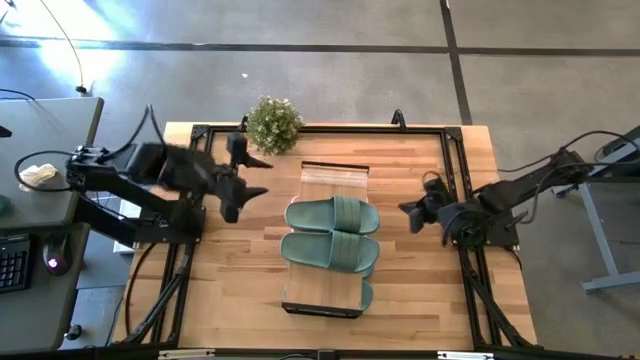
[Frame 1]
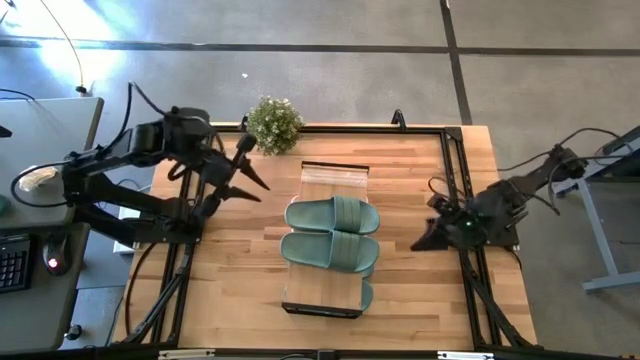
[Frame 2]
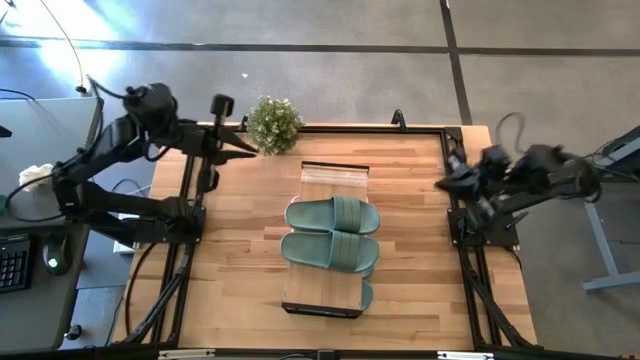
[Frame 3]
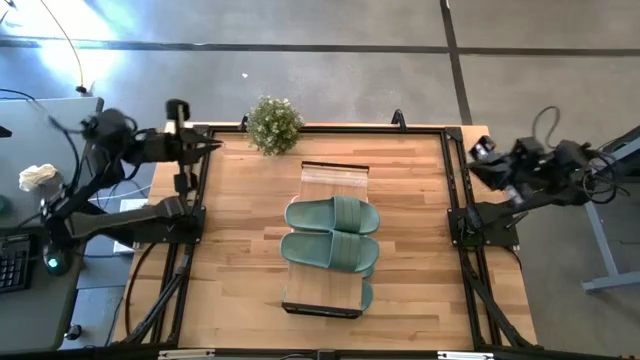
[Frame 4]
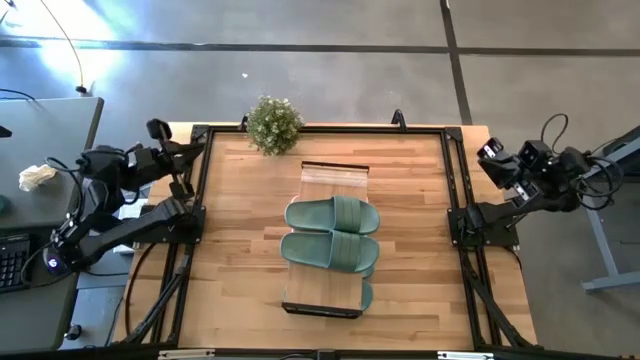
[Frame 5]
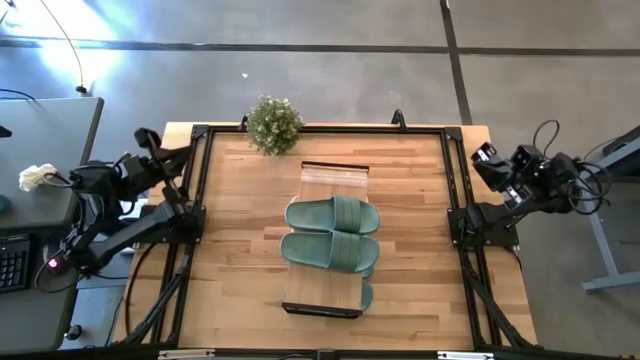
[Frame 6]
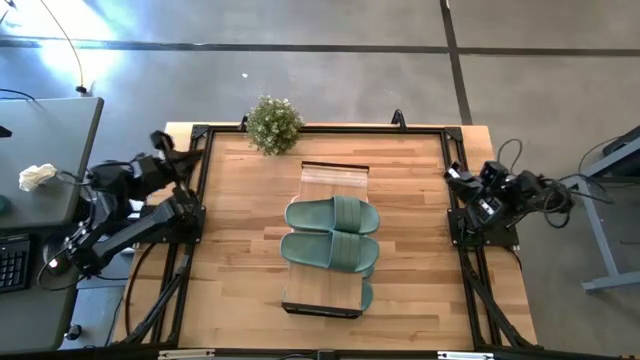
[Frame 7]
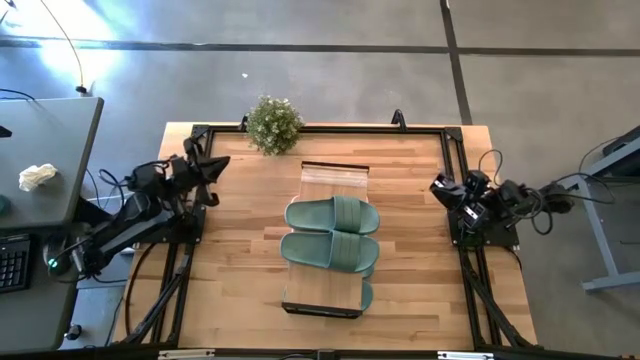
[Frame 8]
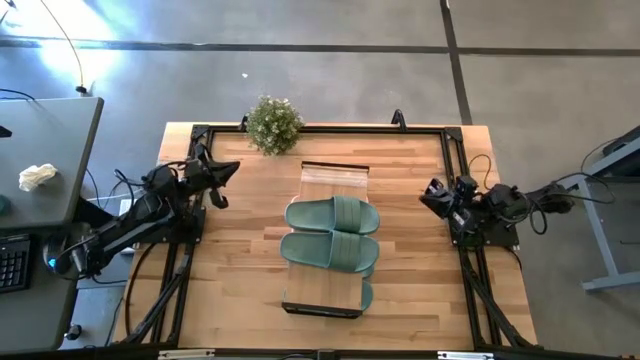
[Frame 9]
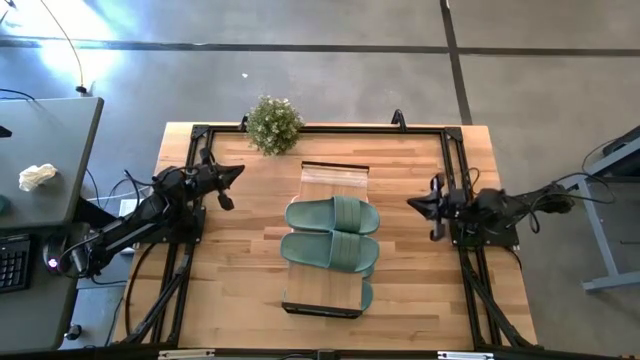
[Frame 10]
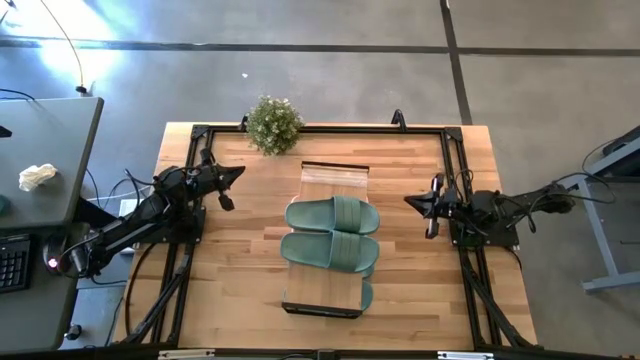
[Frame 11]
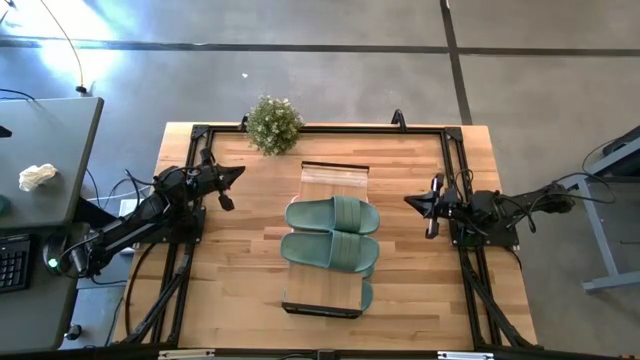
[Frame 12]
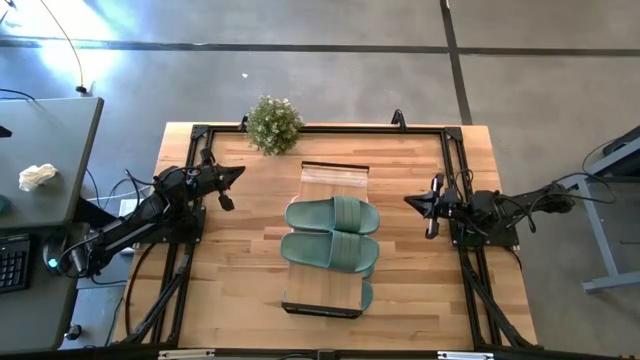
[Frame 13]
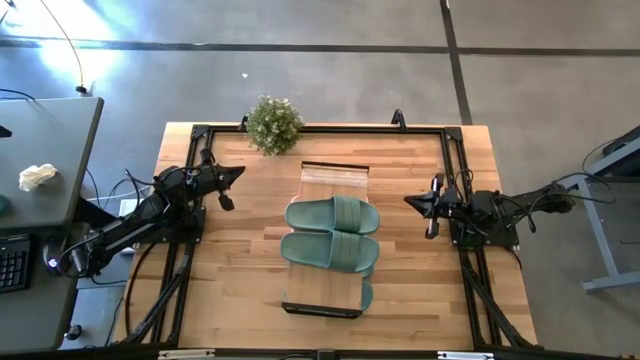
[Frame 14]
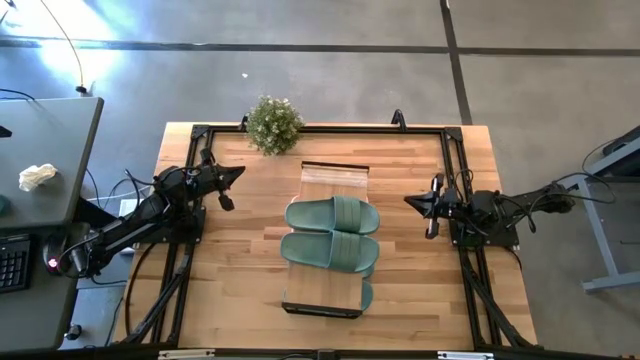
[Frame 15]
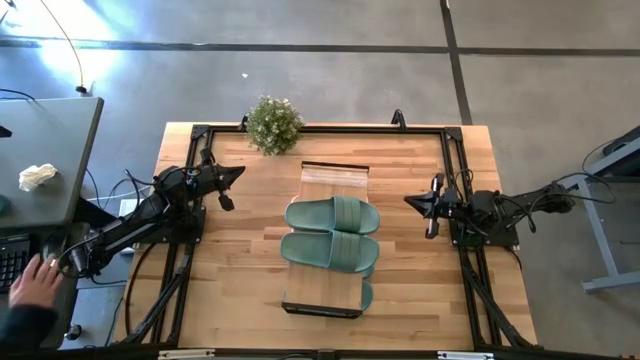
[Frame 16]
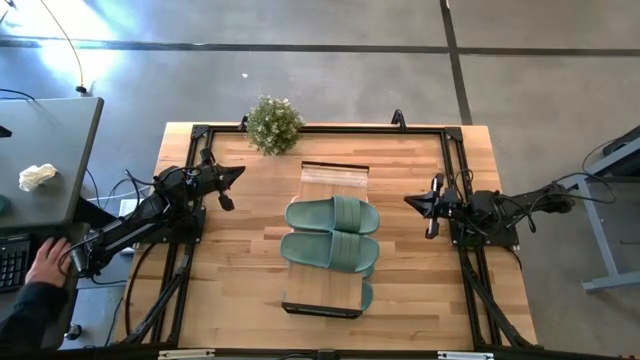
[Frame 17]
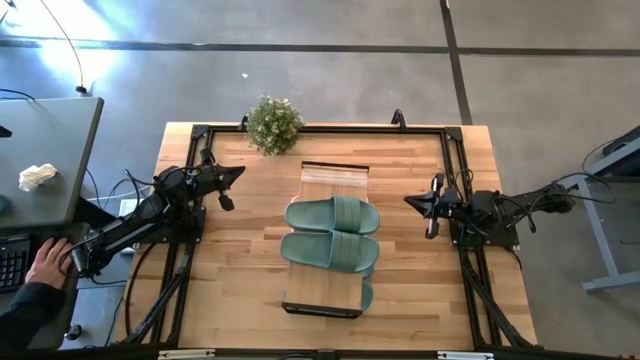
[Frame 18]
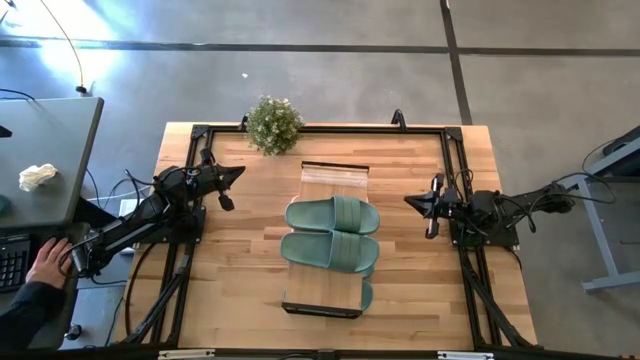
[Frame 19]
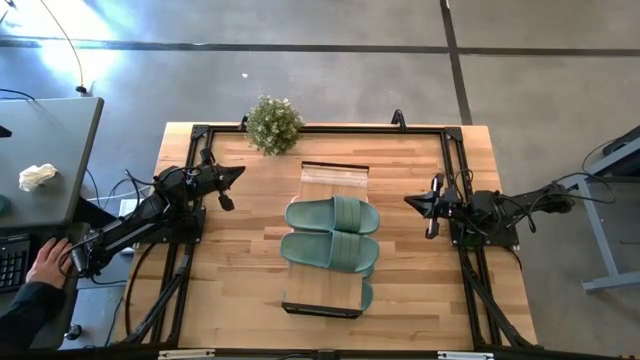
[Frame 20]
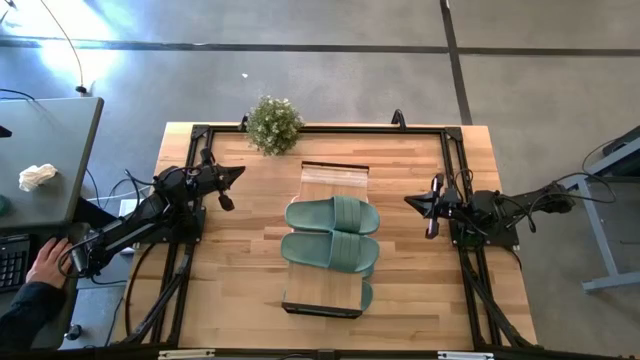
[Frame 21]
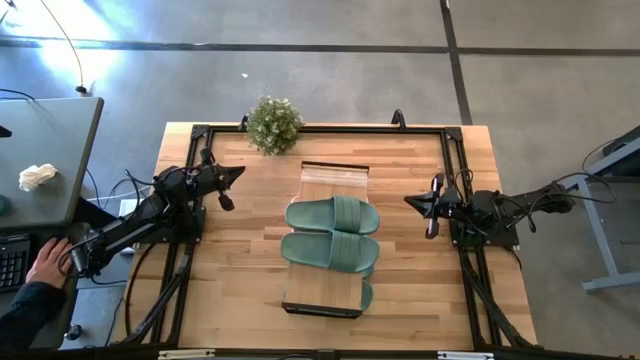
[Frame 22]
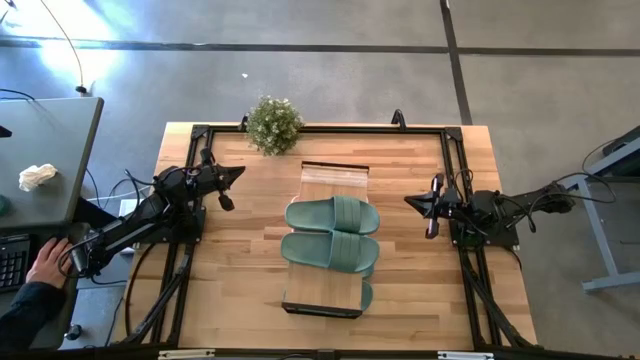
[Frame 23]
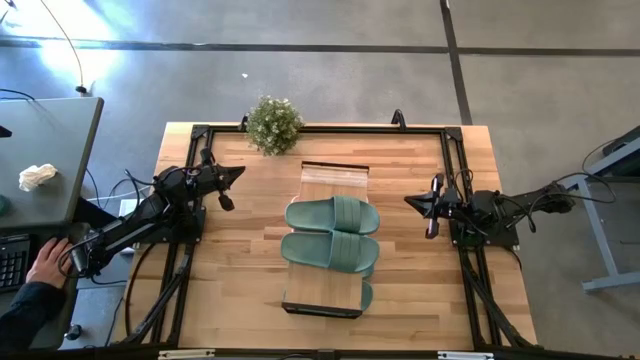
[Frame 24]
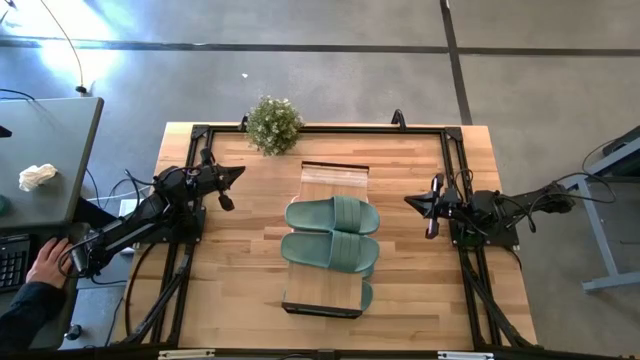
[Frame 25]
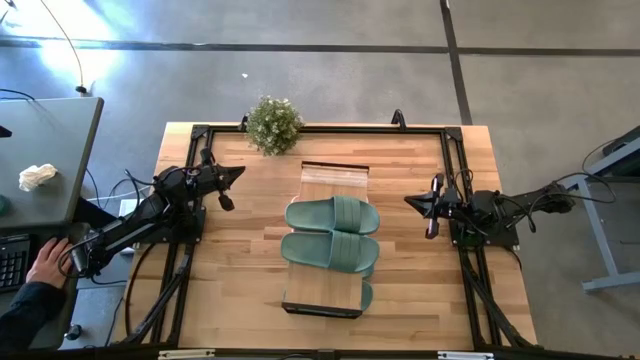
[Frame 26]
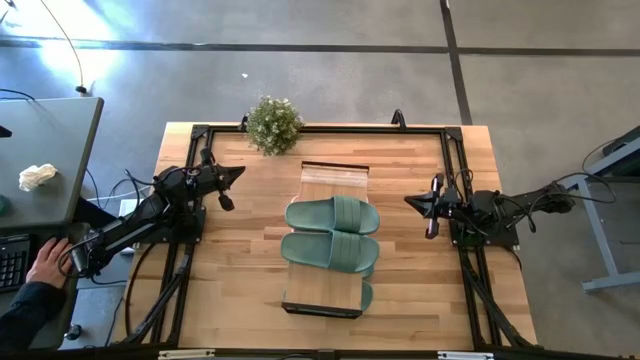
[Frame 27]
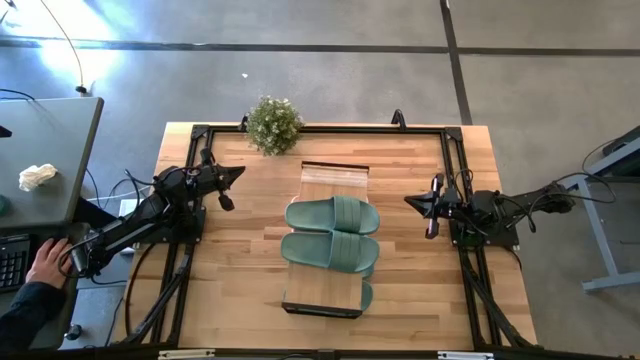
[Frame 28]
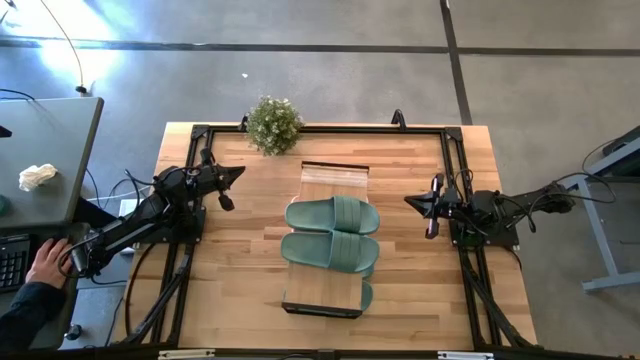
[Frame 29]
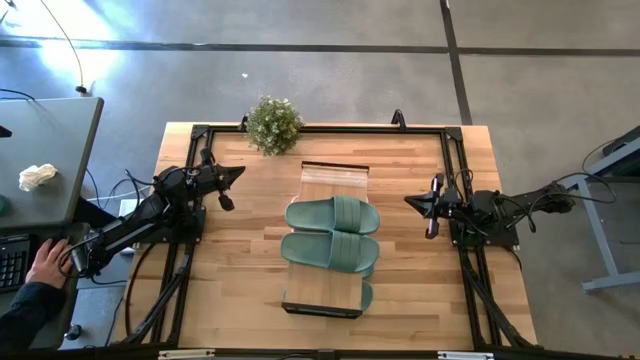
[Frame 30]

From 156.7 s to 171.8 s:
Task: Pick and place slides into the shelf
Return to Home Position

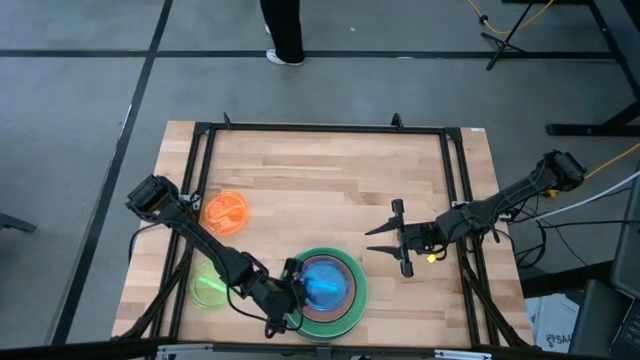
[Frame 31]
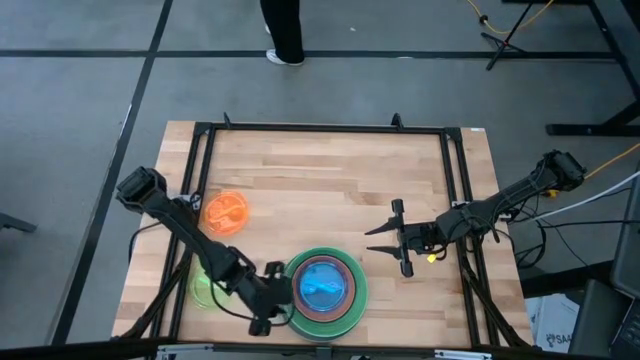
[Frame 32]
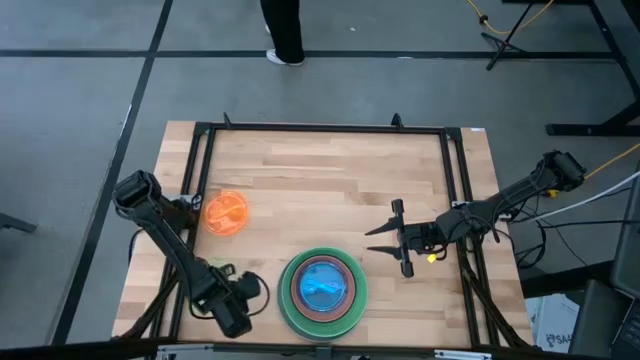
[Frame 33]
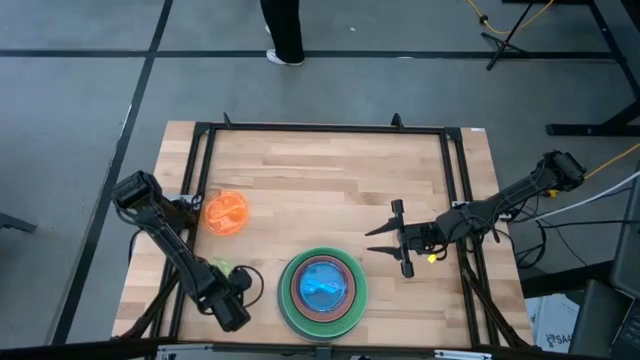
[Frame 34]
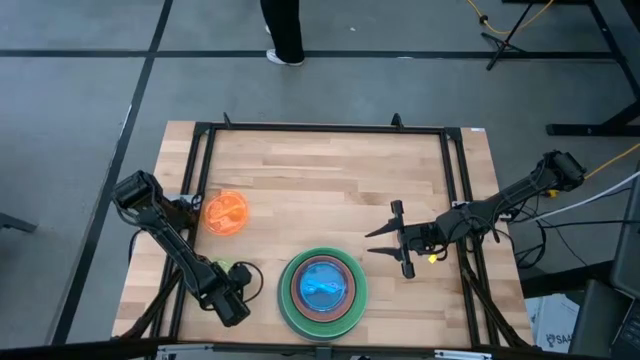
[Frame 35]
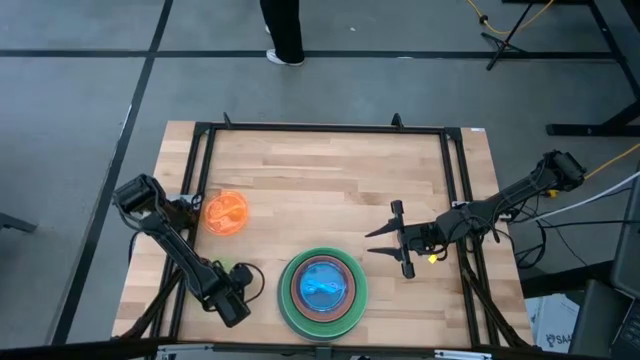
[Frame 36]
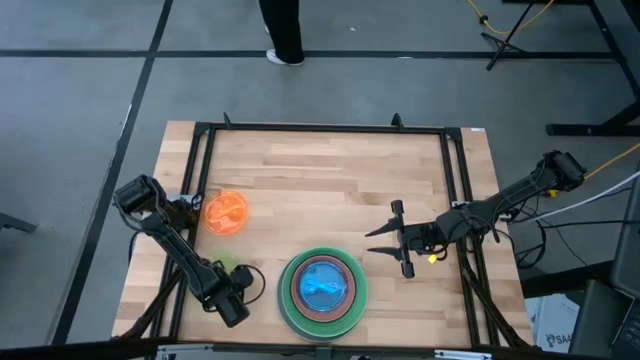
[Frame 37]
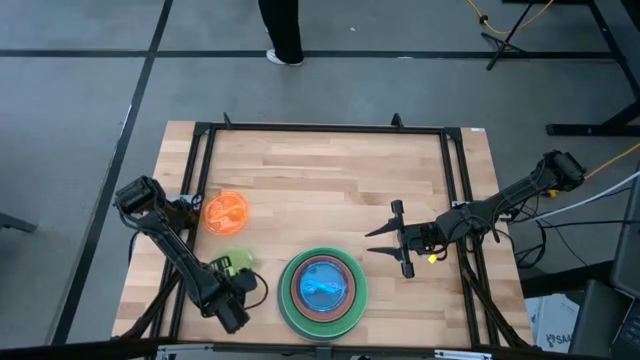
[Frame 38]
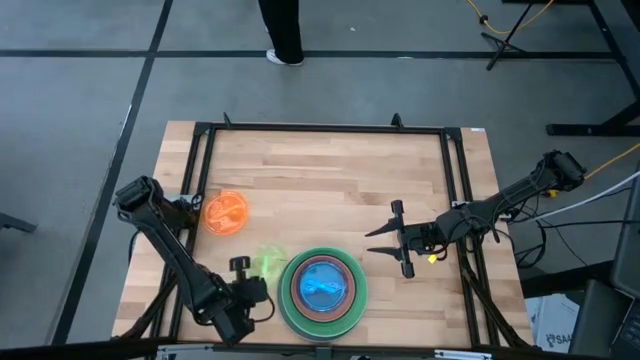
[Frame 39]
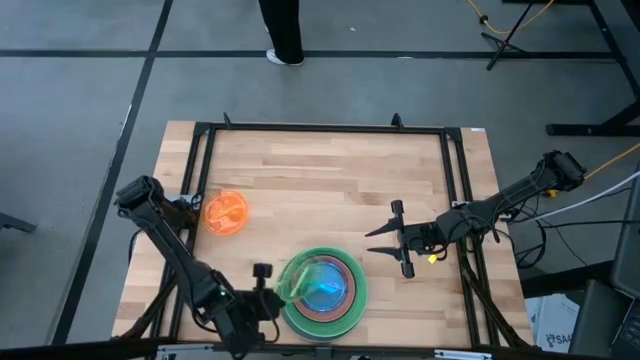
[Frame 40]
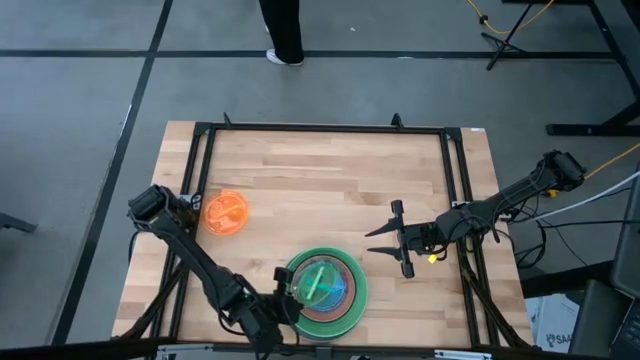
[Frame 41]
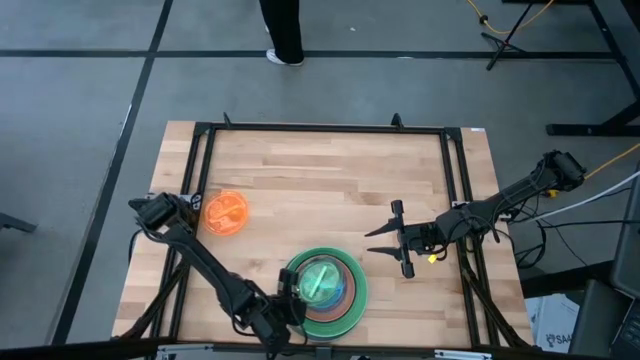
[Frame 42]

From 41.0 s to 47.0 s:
Task: Stack plastic plates
Stack the light green plate on top of the blue plate
